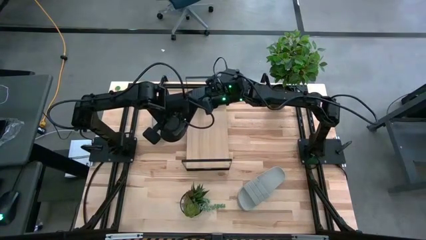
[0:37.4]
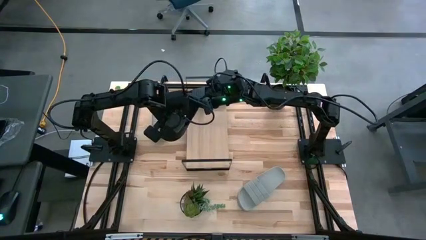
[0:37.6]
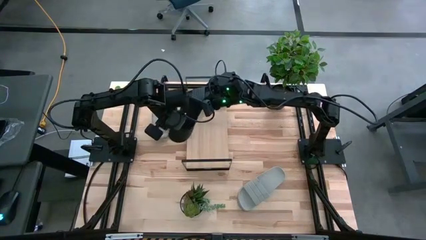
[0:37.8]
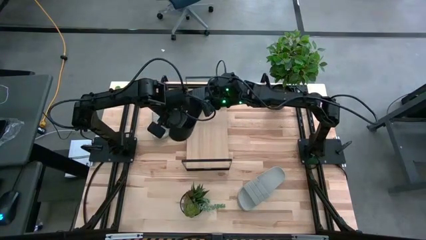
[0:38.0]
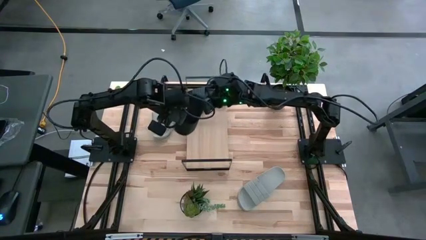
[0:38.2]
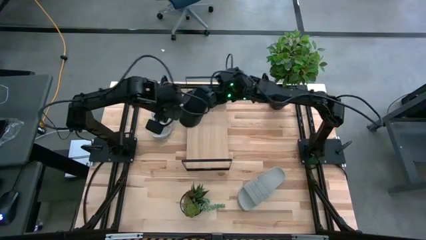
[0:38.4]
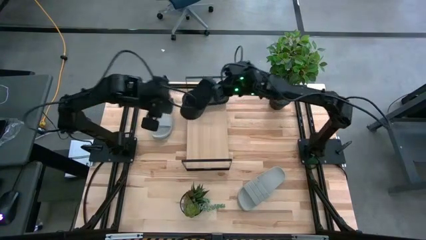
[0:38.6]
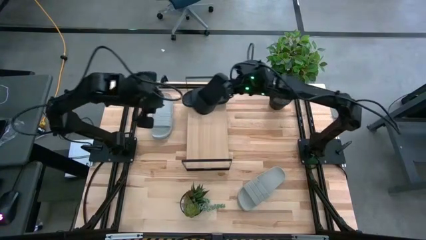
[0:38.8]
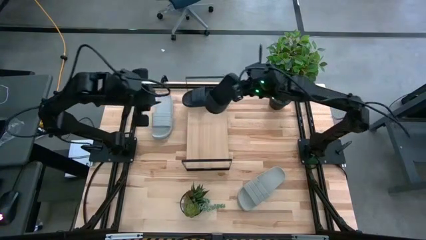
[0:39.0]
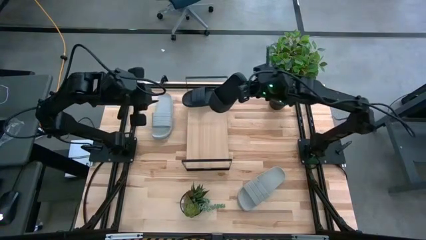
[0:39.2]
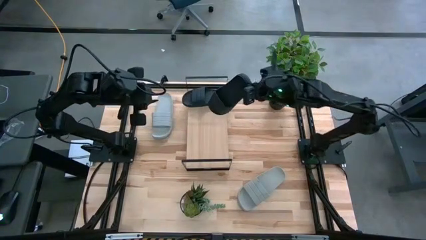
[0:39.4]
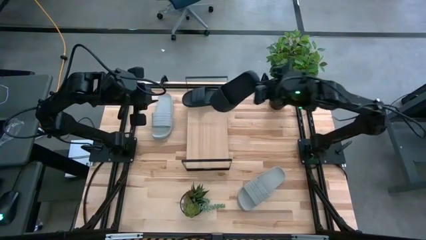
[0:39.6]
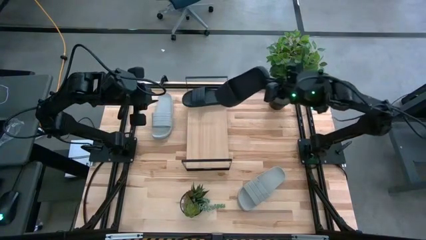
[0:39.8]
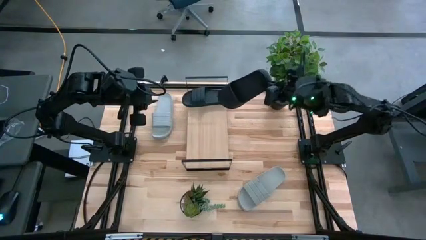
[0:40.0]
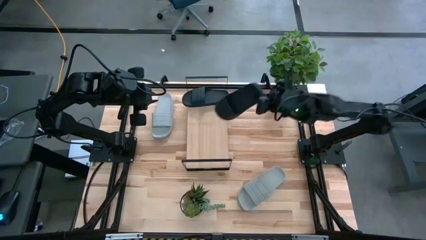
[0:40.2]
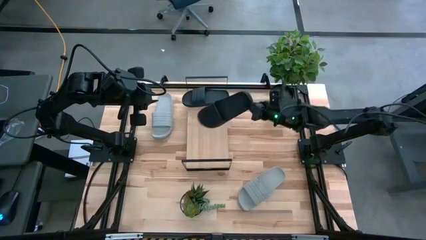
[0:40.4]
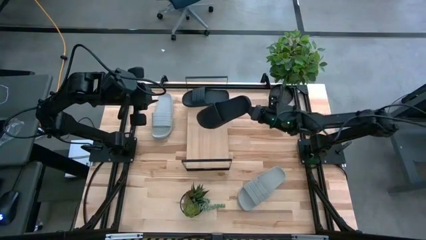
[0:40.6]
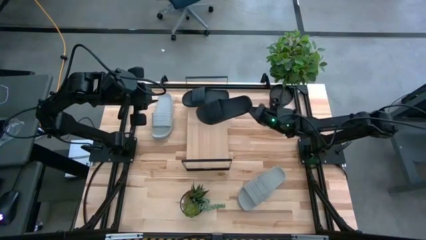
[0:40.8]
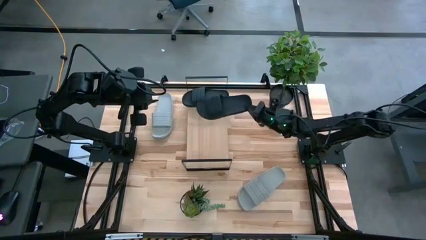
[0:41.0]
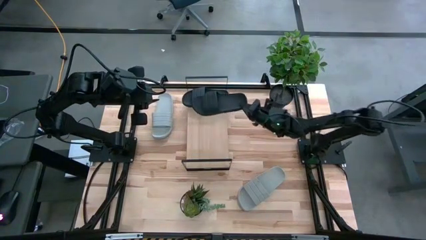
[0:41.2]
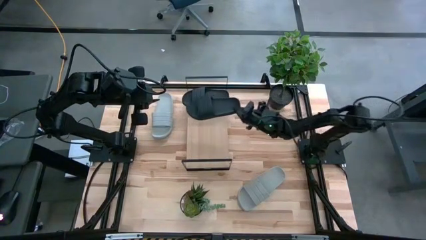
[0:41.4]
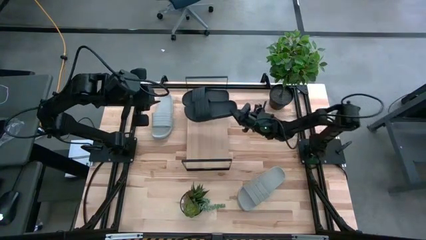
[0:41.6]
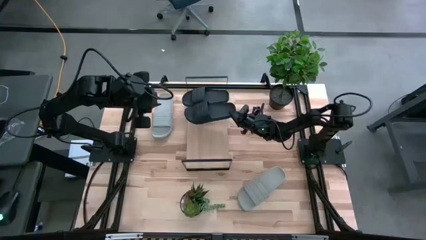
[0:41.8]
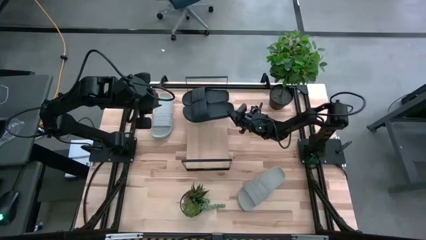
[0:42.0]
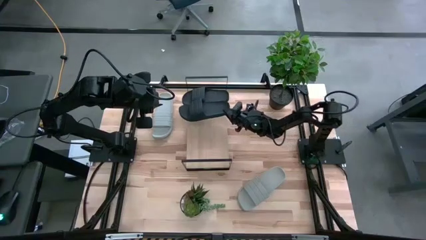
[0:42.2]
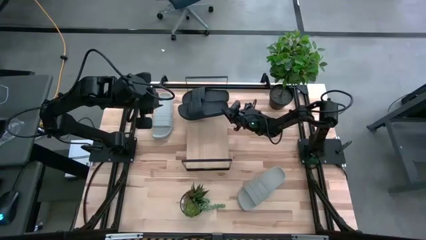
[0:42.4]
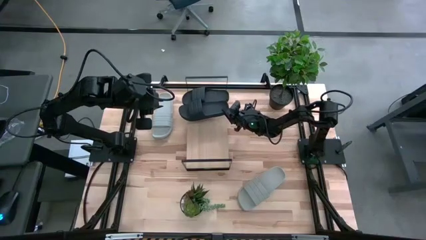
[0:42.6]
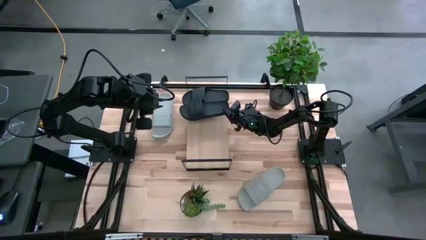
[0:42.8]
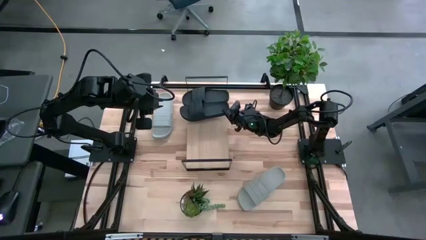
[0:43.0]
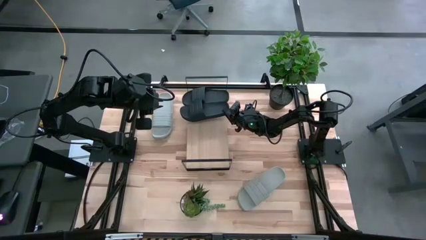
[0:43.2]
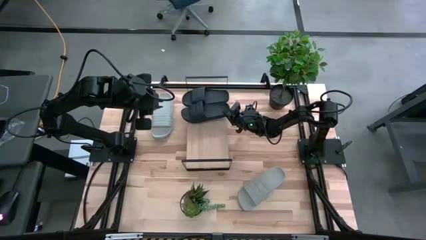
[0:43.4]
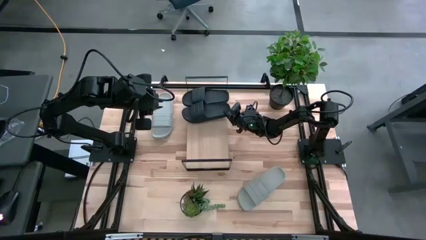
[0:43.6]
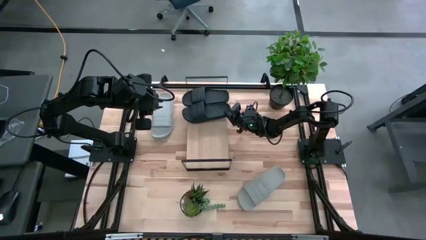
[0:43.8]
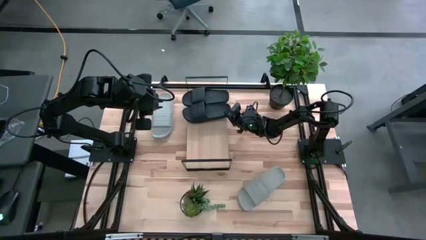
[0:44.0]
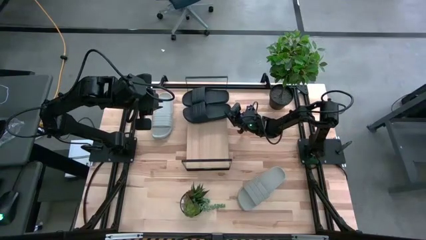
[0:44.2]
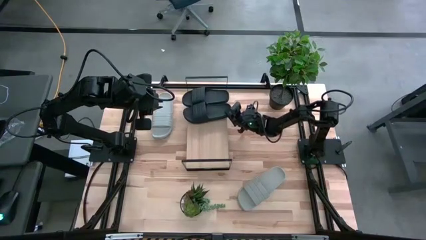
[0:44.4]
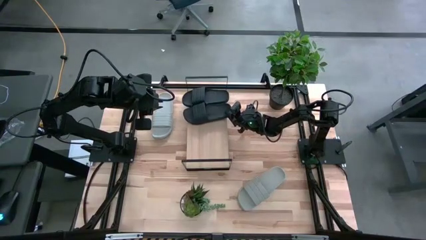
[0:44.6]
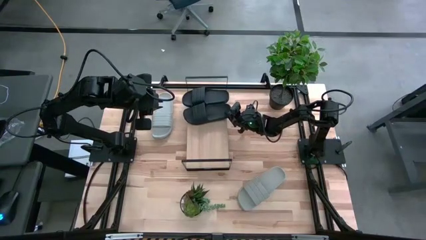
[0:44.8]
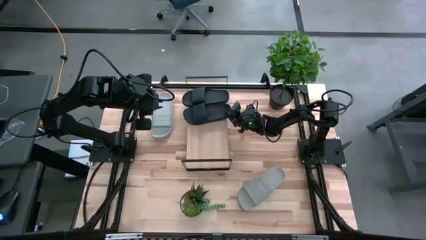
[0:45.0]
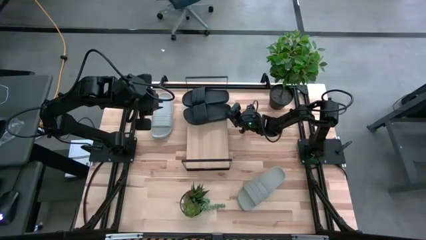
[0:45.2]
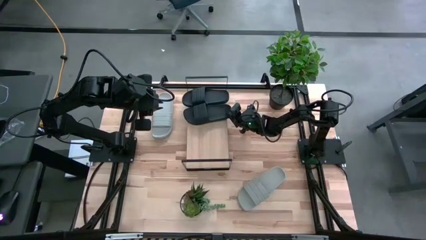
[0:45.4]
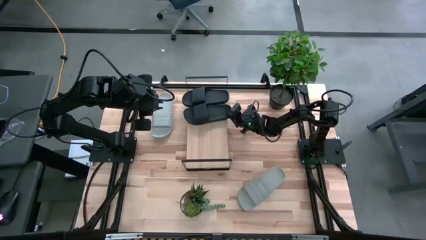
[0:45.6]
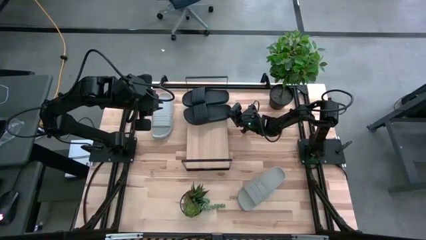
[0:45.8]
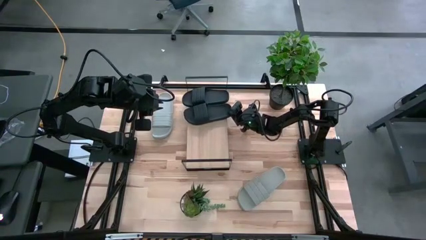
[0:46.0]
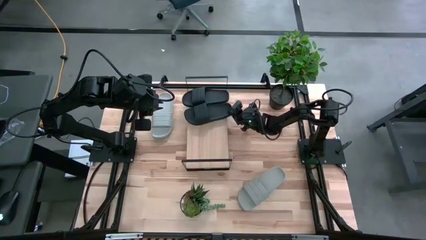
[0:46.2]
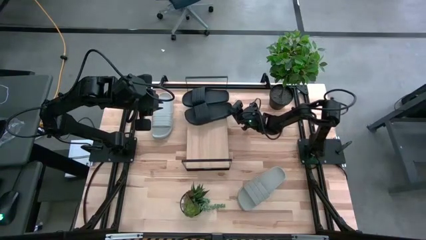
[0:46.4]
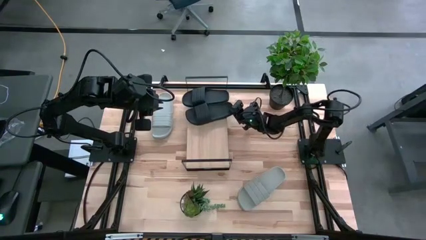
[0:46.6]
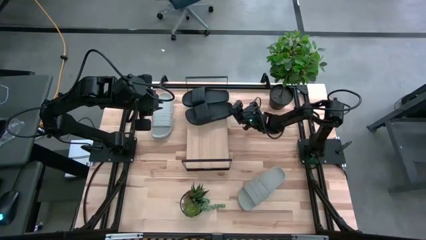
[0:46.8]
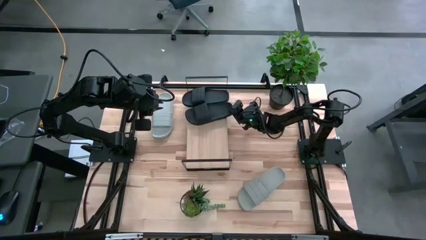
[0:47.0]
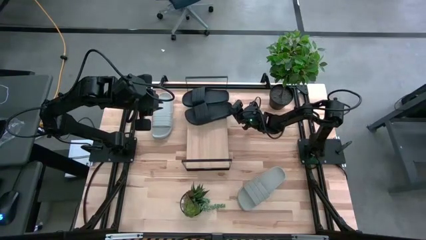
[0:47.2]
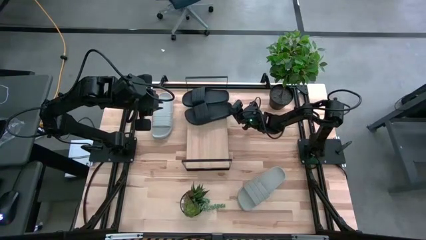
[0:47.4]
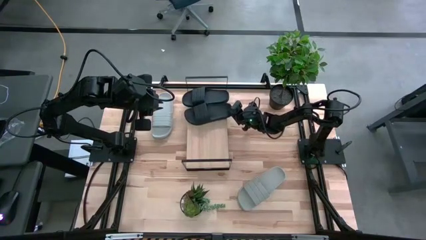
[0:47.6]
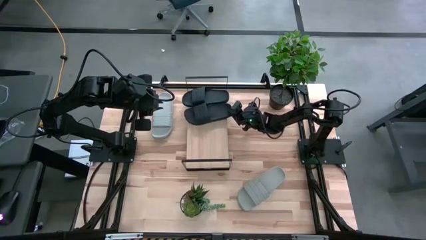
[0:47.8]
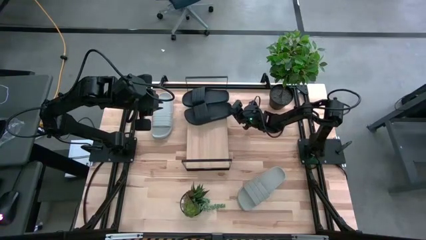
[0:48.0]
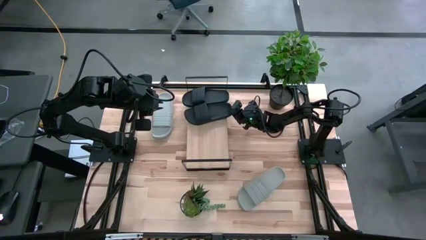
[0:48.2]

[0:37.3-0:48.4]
Task: Pick and place slides into the shelf
Put the black slipper slide on the shelf
